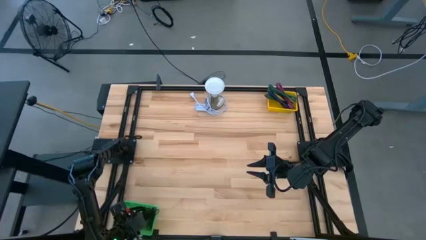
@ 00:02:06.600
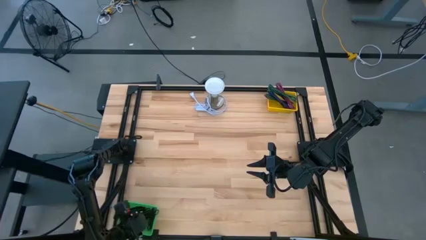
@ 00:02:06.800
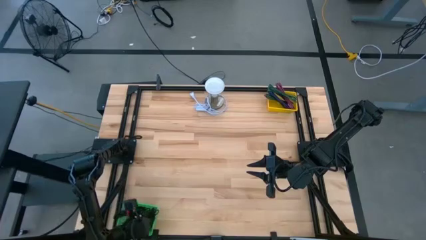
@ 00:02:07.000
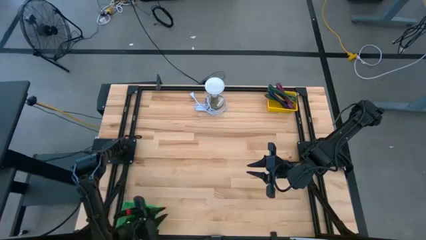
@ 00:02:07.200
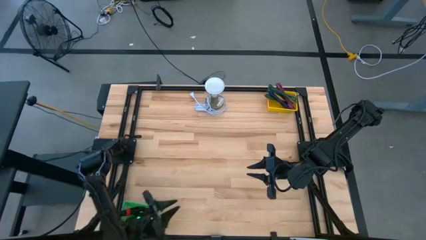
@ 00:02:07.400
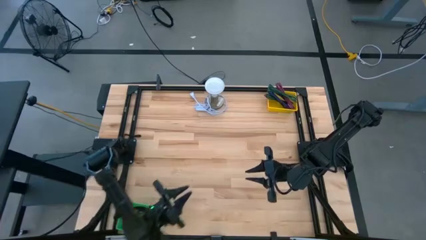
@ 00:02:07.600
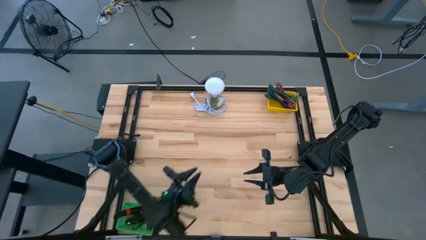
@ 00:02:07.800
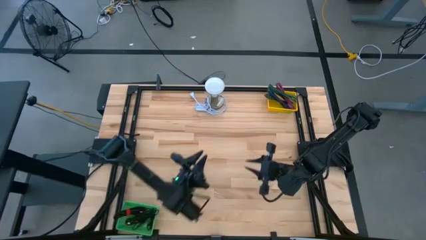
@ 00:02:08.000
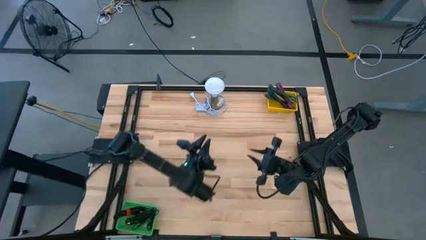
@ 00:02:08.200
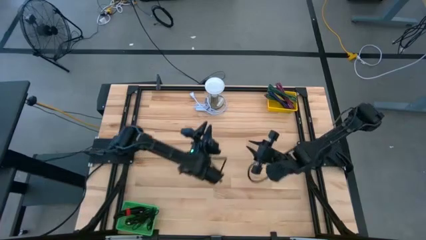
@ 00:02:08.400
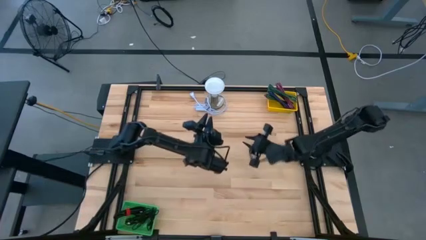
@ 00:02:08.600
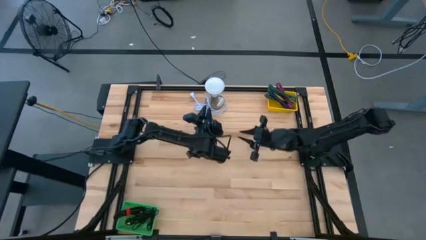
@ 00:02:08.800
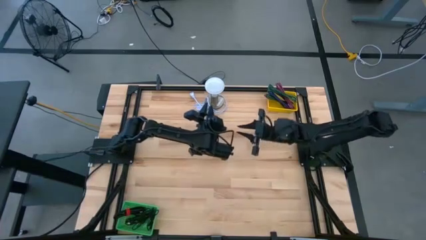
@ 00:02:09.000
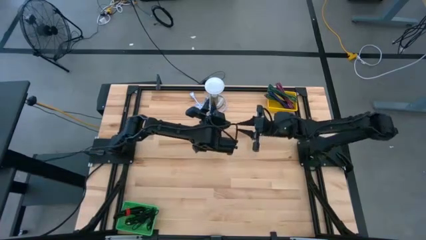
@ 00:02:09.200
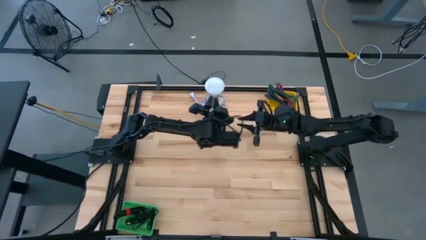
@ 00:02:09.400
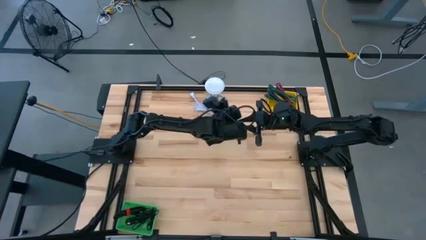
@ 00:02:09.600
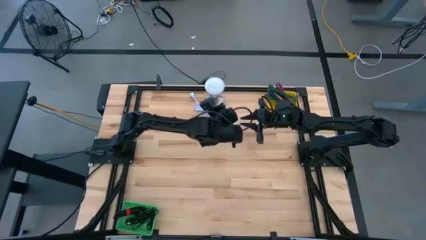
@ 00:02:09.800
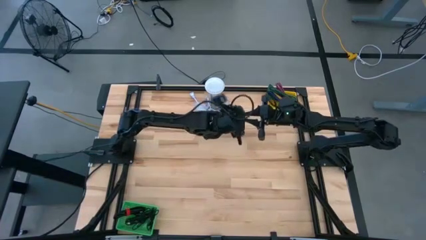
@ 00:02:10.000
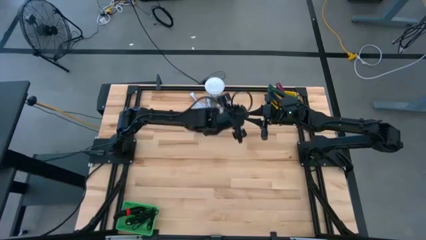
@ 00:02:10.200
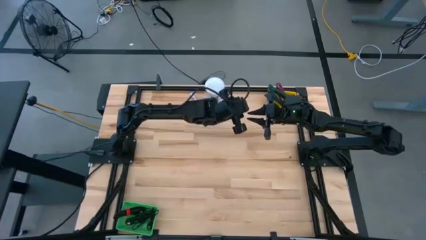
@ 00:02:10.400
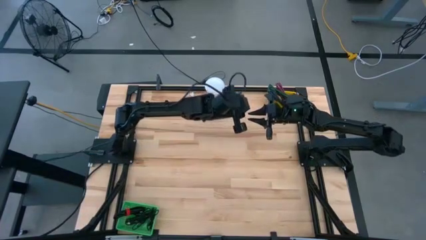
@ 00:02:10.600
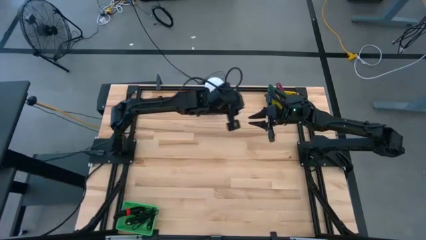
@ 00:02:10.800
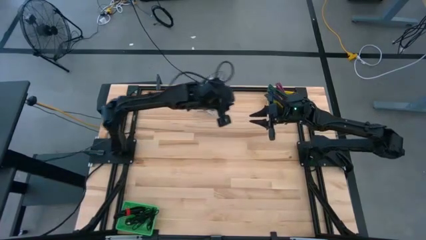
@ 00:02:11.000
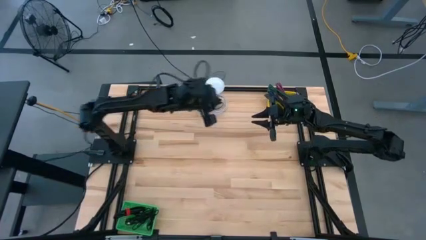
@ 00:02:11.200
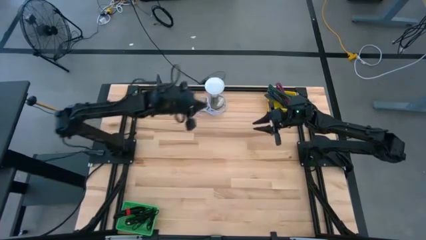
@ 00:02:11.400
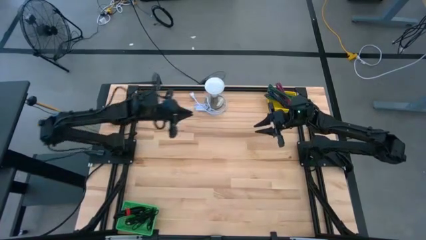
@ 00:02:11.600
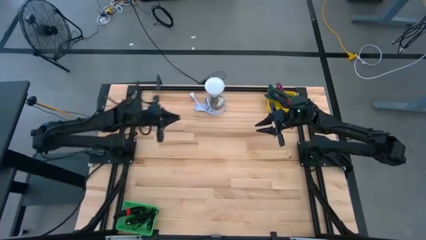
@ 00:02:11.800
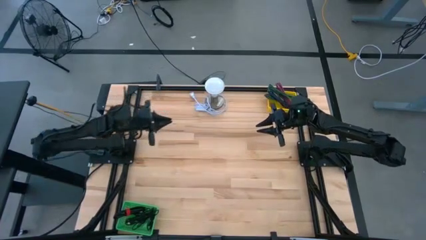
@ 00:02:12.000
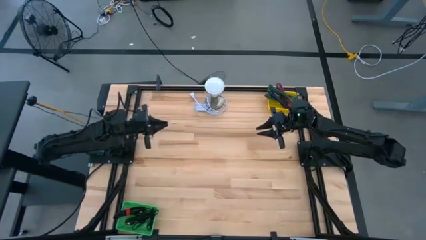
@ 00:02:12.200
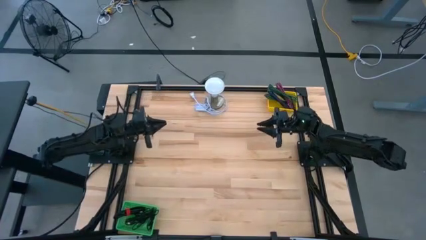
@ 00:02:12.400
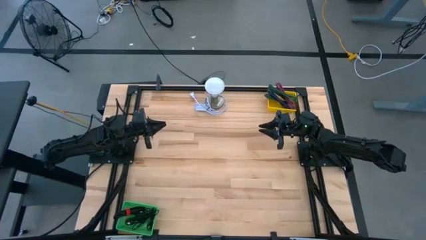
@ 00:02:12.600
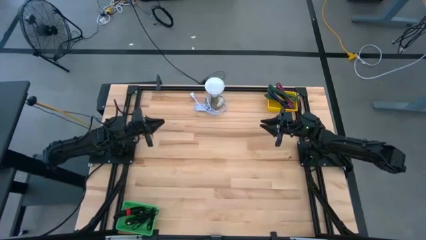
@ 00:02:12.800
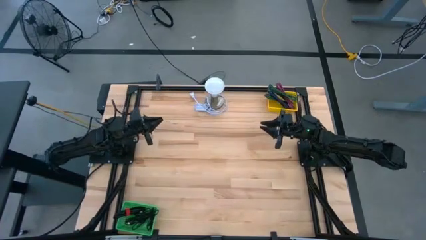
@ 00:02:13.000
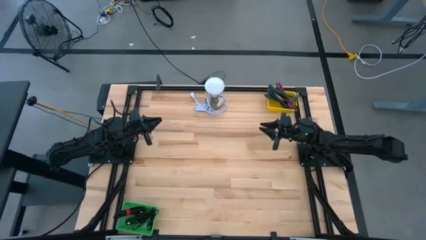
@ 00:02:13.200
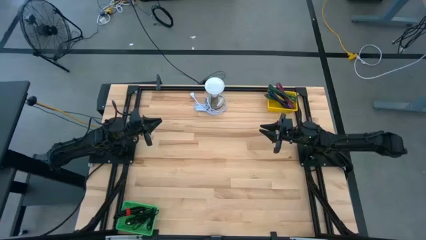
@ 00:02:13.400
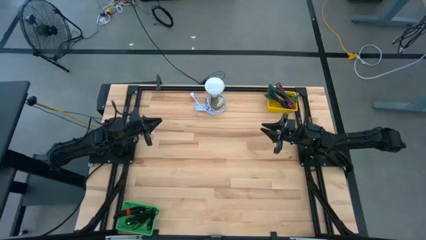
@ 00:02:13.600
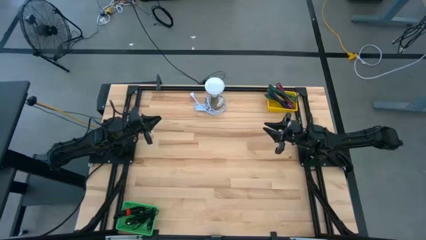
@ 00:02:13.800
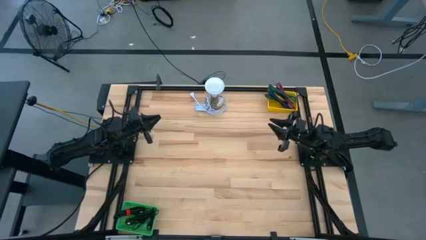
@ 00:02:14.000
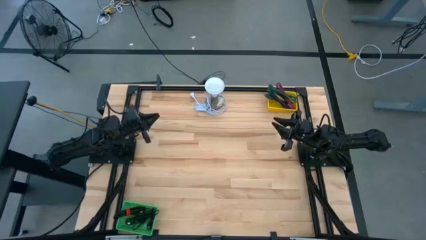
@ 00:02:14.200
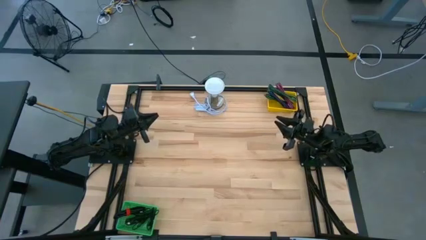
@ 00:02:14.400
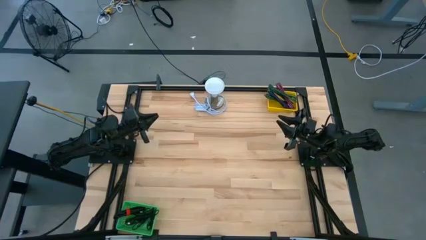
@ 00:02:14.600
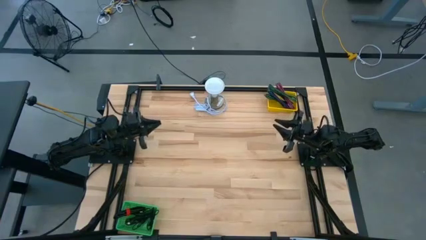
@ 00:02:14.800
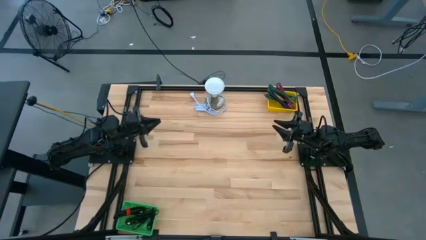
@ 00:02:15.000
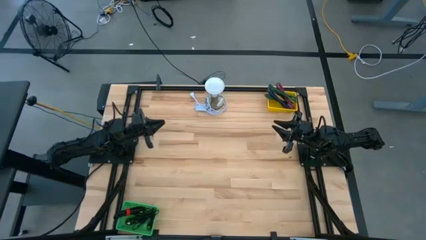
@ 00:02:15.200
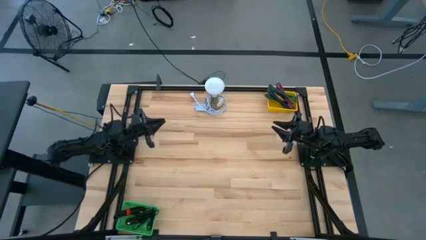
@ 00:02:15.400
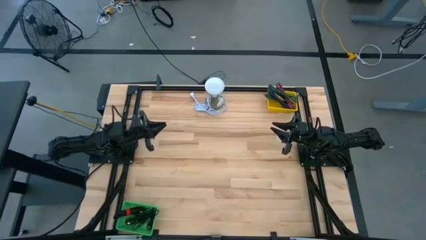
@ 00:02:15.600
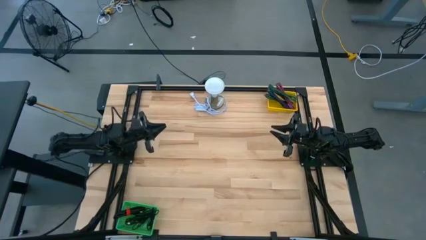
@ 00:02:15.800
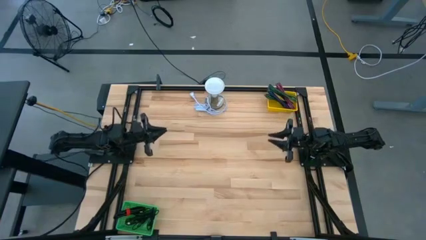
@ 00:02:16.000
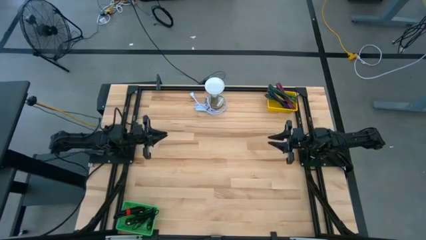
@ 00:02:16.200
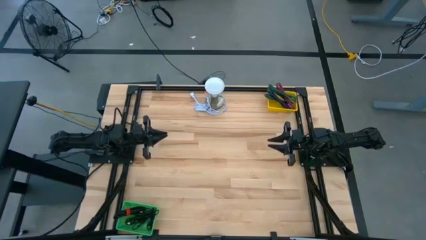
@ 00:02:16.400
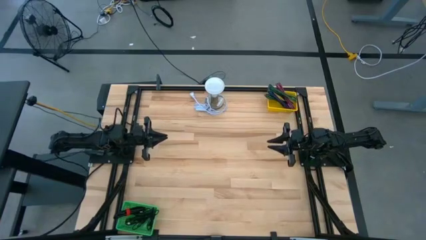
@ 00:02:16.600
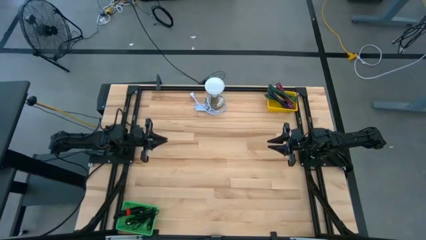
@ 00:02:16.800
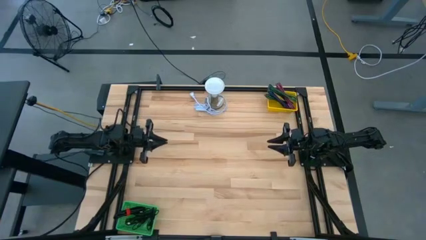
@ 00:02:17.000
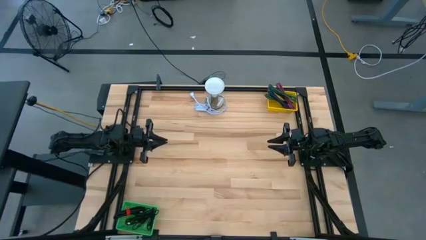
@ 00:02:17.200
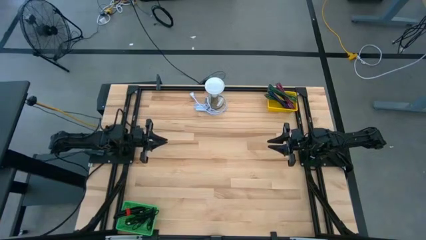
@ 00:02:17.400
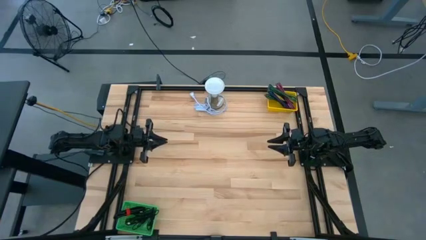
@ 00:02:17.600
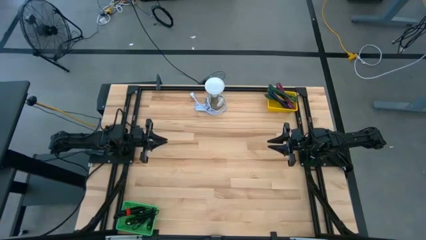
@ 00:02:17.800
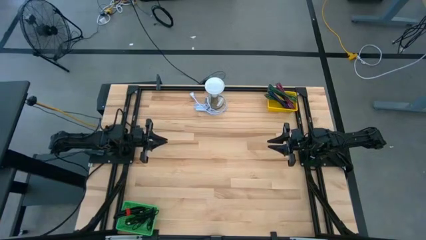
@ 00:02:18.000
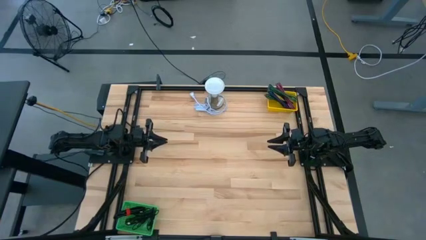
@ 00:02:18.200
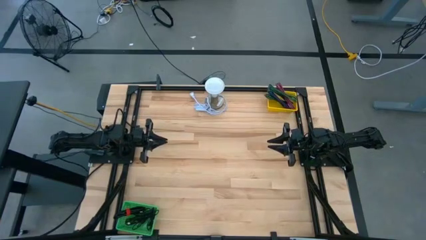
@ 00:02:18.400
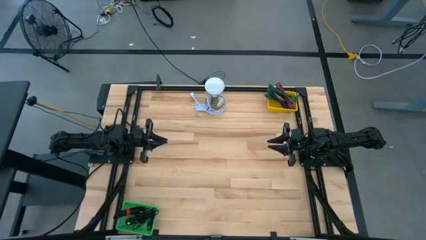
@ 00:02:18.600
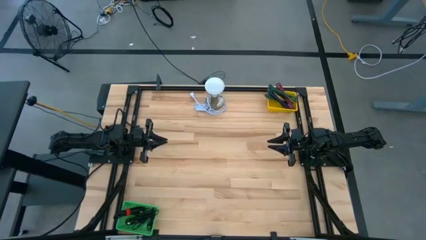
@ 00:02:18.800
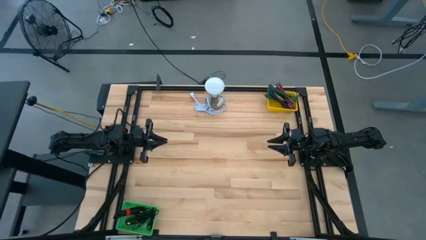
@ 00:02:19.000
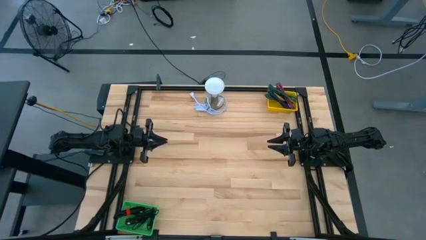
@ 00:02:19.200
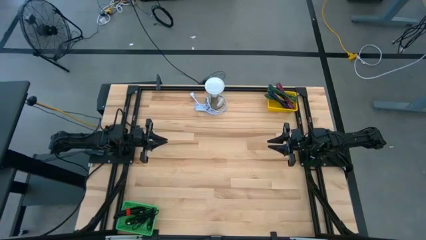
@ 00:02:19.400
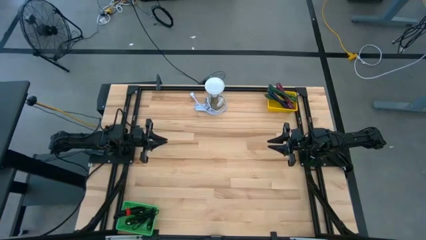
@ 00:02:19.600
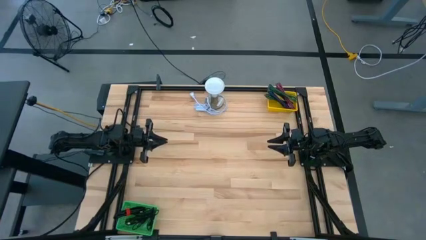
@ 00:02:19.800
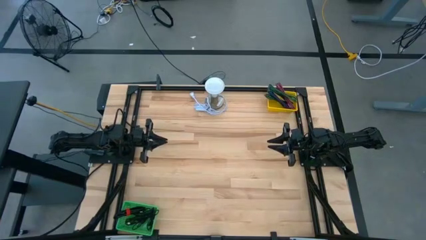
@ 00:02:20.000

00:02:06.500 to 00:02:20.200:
Task: Pick & Place USB Port
Return to Home Position
